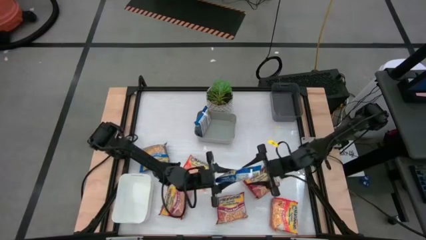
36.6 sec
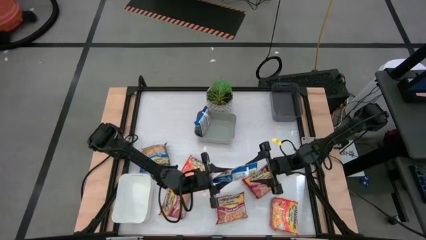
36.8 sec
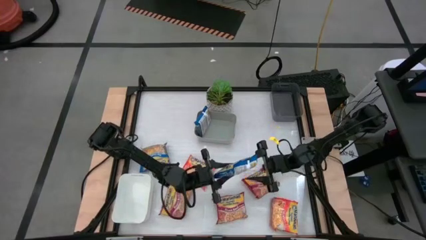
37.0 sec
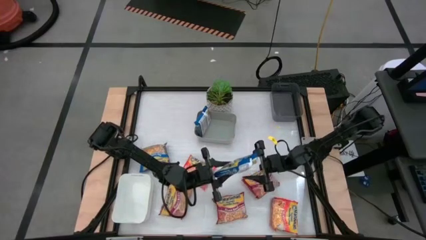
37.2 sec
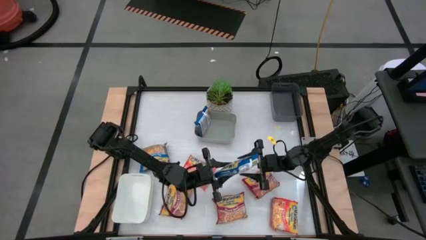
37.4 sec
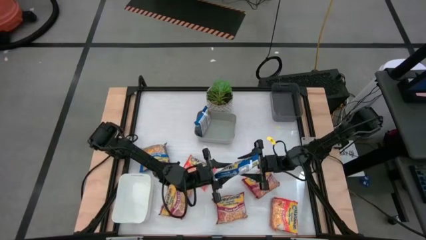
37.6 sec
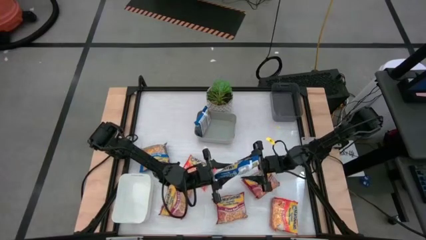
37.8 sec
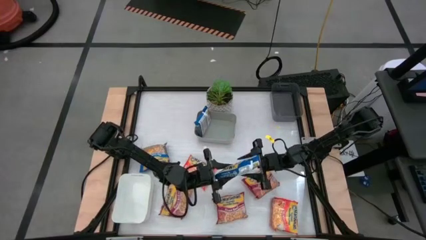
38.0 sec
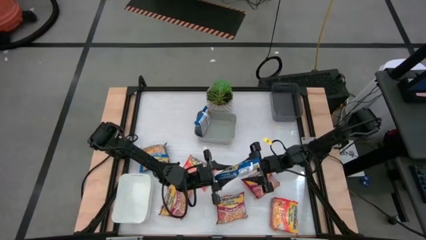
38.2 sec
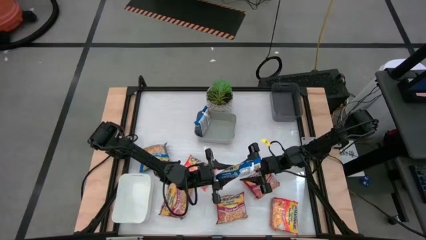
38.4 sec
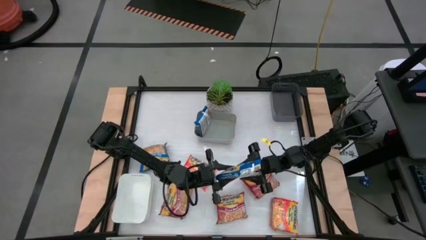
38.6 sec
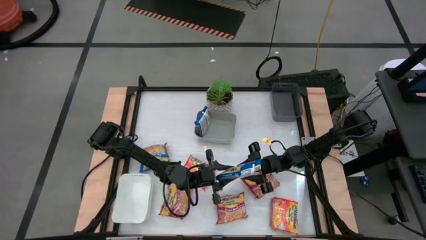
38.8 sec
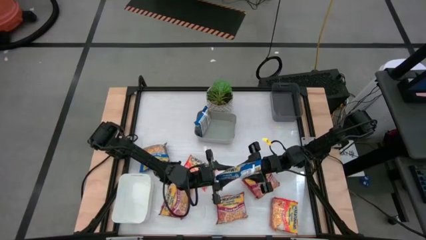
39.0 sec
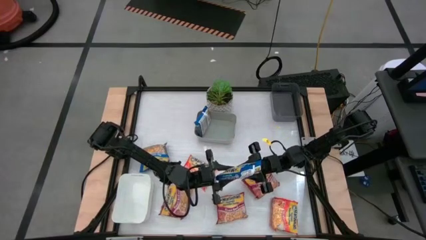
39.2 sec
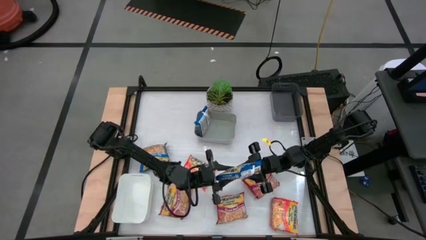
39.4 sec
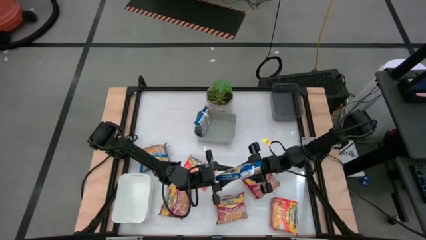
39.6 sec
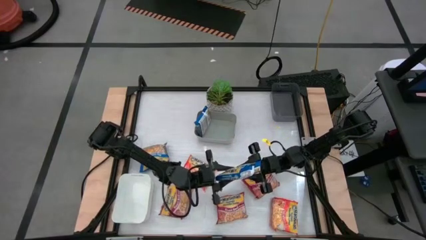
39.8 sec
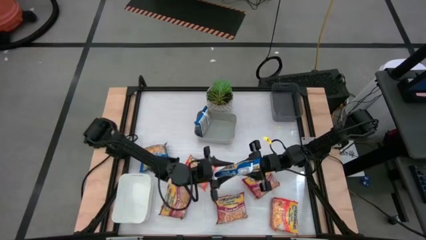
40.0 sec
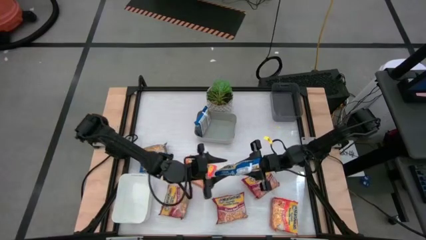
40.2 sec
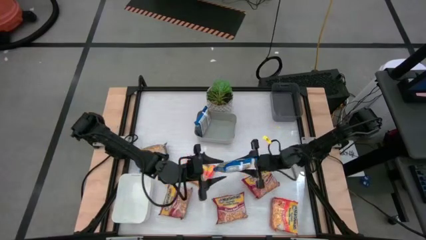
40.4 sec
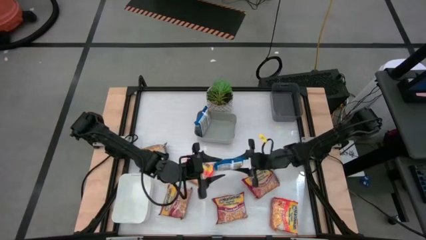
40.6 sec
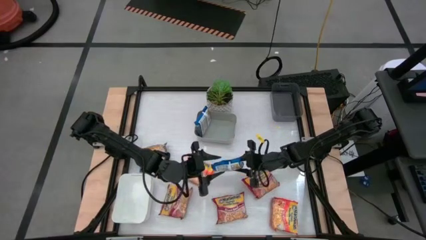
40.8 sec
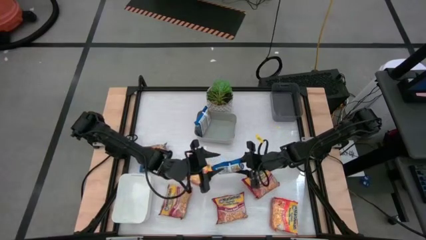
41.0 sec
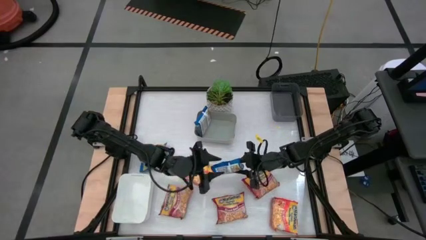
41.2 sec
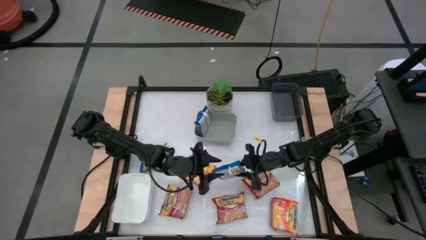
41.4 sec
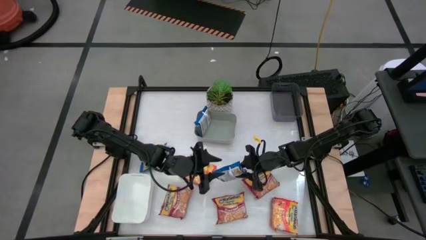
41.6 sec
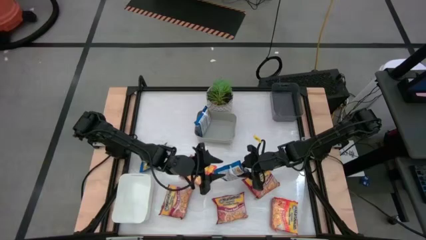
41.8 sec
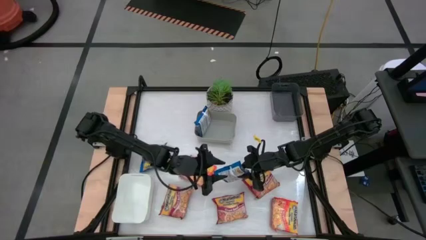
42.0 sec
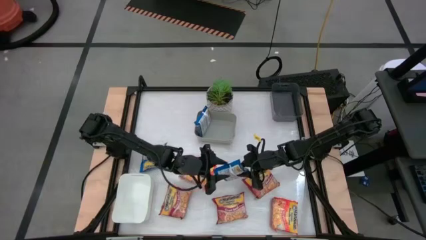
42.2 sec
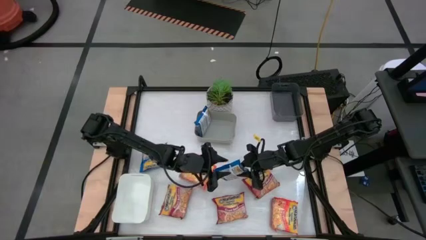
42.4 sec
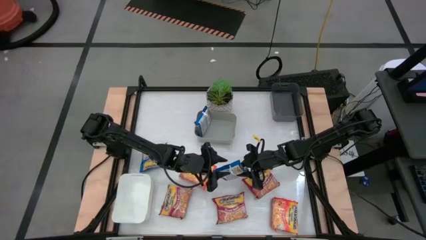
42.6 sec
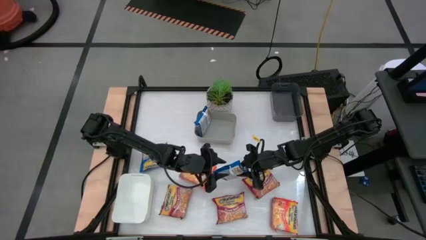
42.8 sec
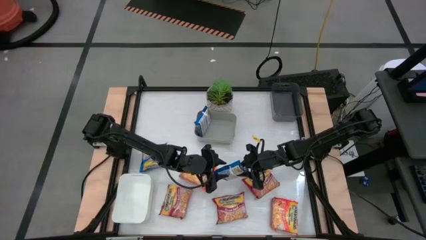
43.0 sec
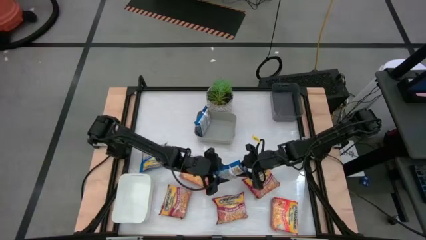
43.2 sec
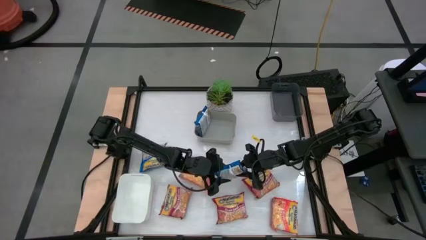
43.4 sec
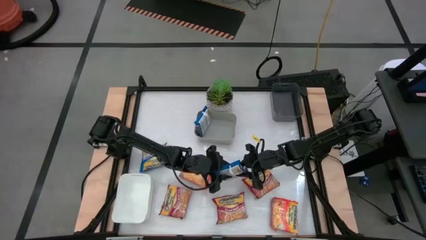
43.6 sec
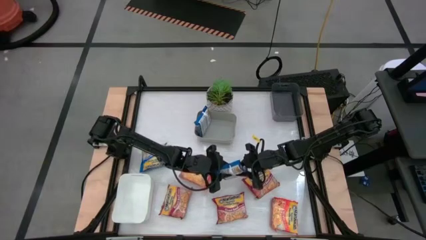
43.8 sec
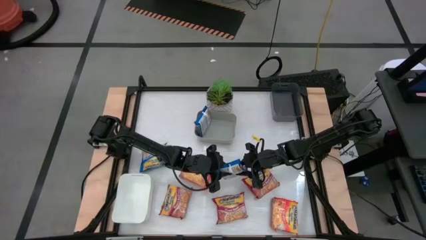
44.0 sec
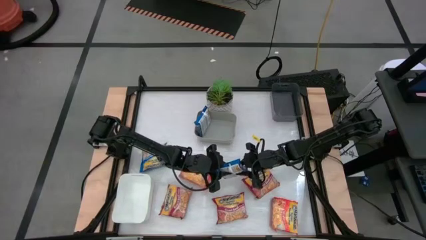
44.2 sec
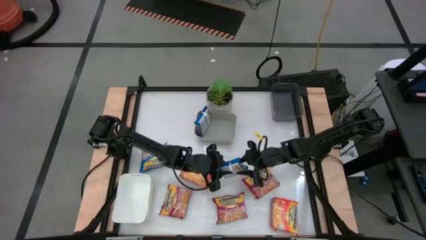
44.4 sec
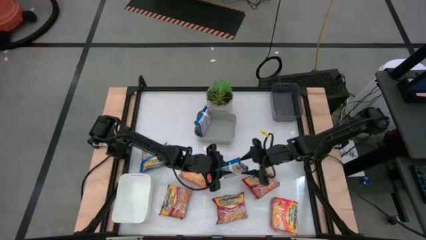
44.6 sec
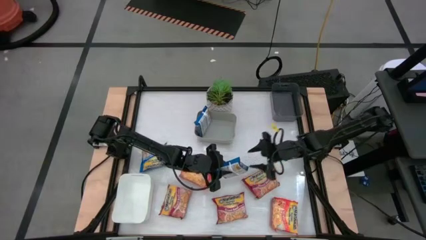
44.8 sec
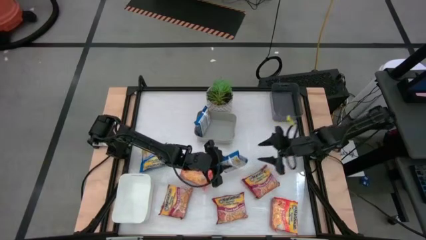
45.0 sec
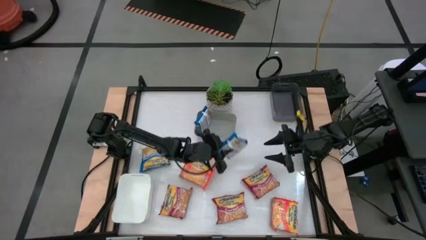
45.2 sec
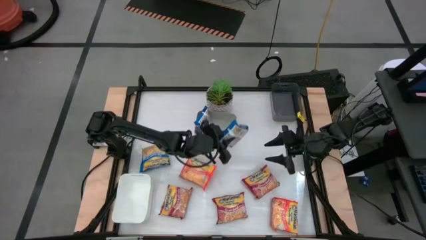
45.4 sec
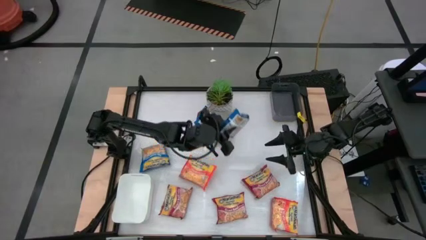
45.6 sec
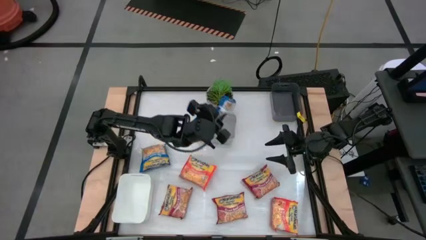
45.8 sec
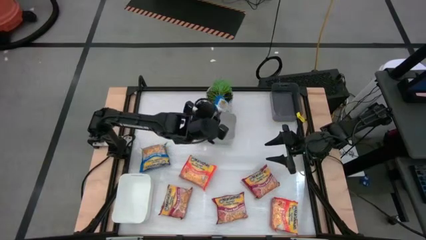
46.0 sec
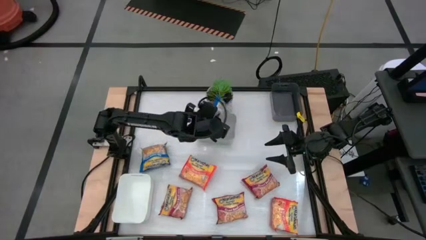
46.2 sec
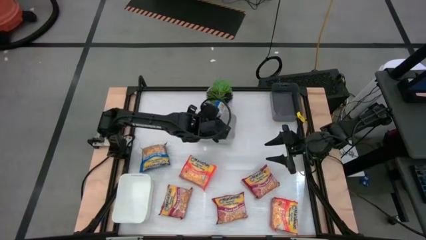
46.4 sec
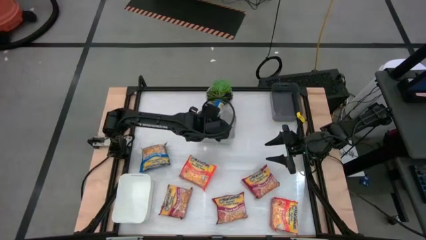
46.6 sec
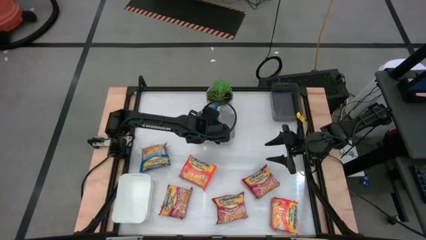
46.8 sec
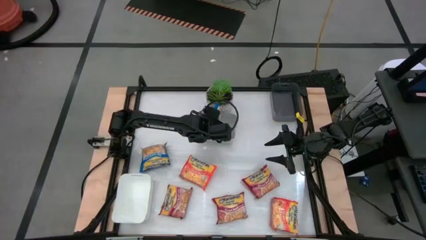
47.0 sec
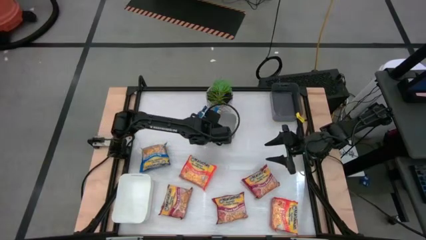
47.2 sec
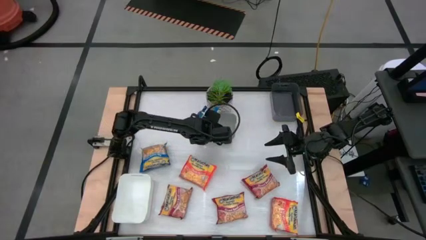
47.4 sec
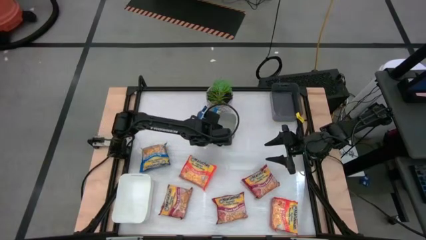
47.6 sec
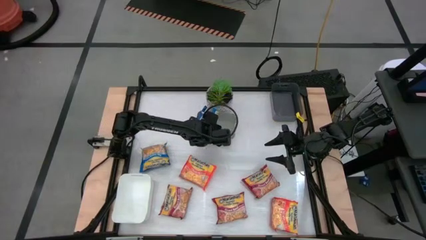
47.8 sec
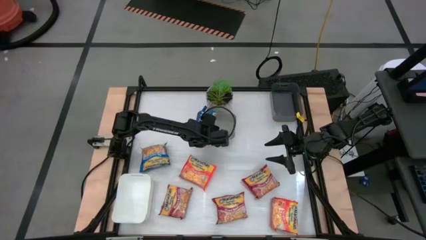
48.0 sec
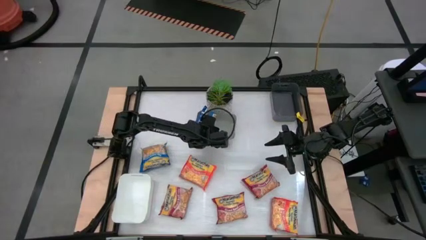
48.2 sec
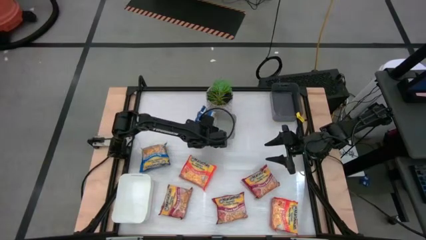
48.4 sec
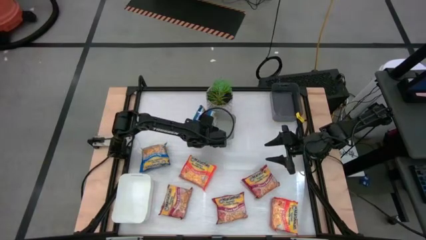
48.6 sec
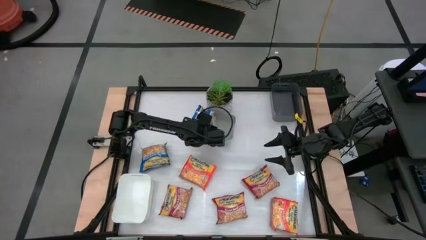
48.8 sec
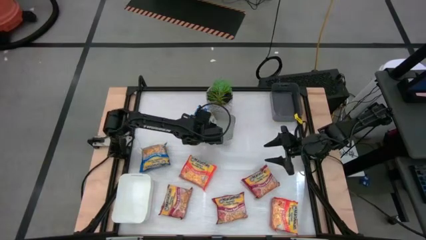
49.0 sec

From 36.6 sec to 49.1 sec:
Task: Sort Maruchan noodles
Put the right blue noodle pack into the gray bin
